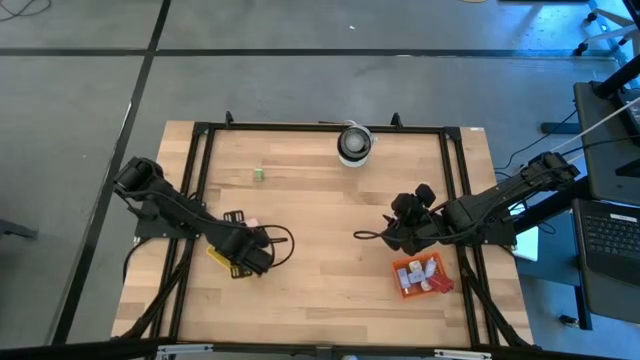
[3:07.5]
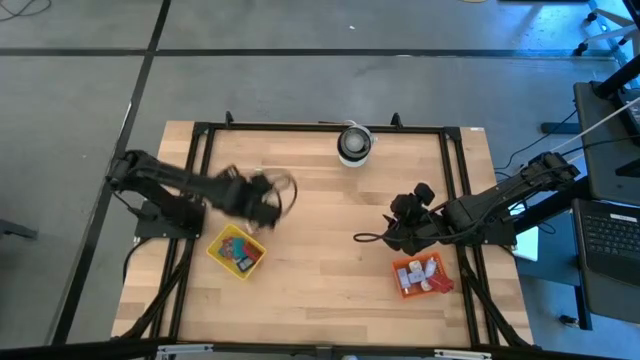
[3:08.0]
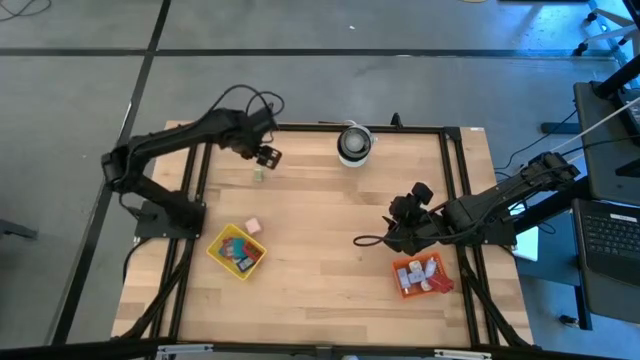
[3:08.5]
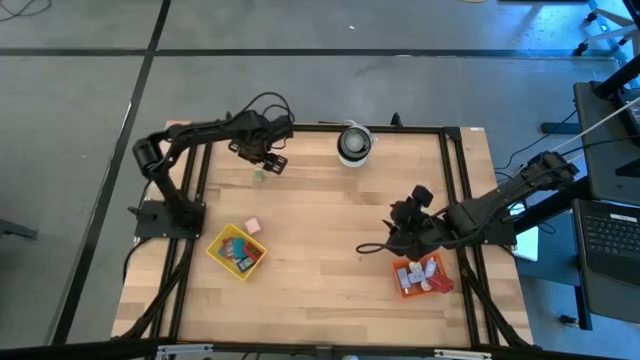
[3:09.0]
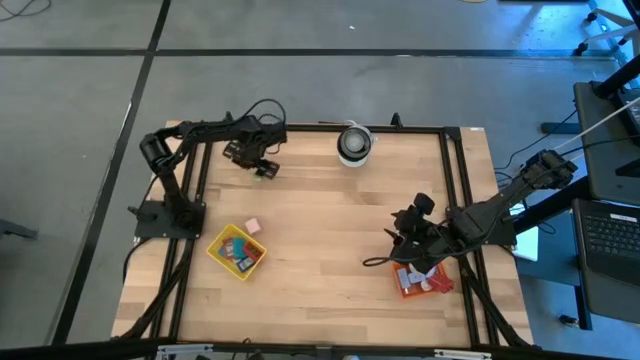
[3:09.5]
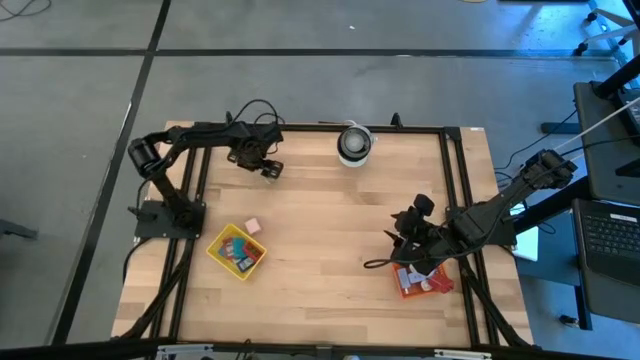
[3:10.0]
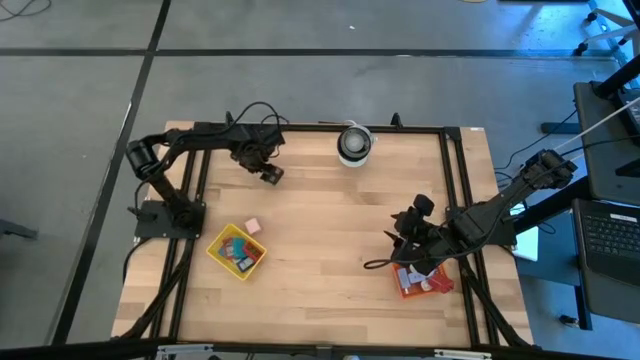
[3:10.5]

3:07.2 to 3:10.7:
Task: Pick & Place Office items
Put the light green charger adapter into the orange bin

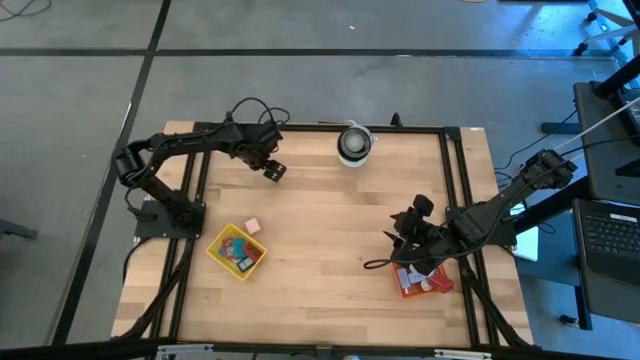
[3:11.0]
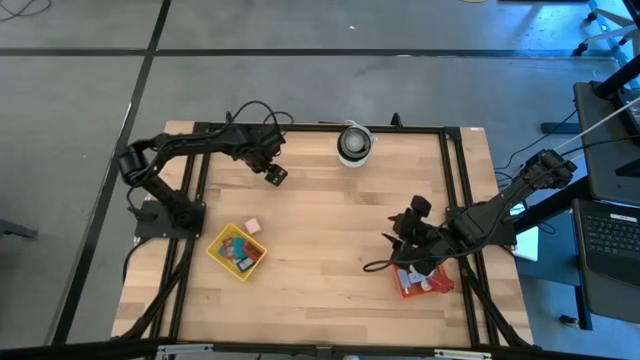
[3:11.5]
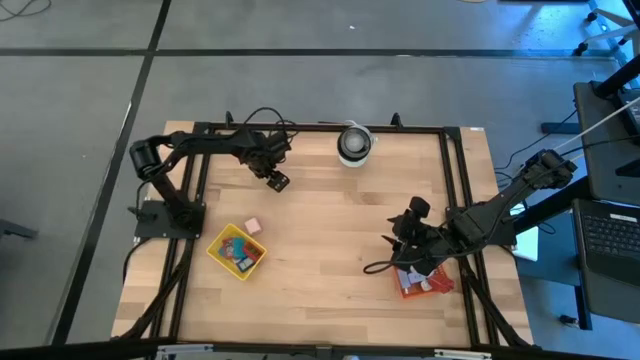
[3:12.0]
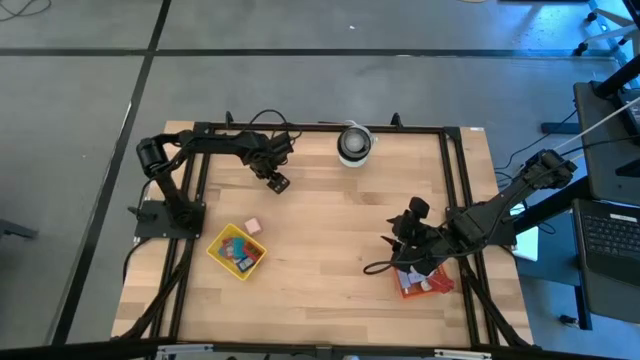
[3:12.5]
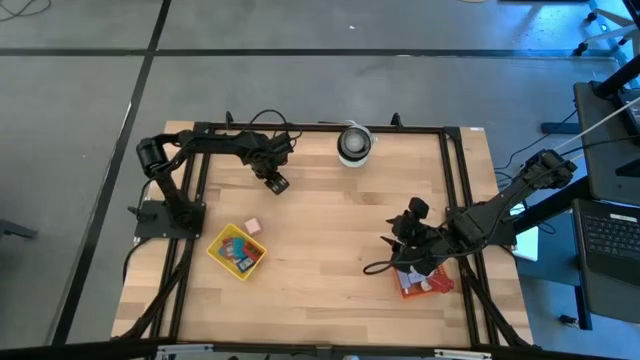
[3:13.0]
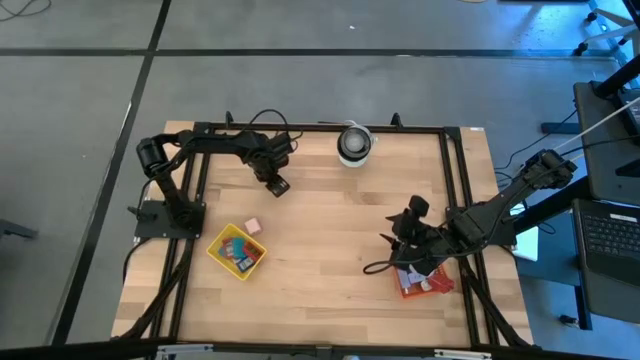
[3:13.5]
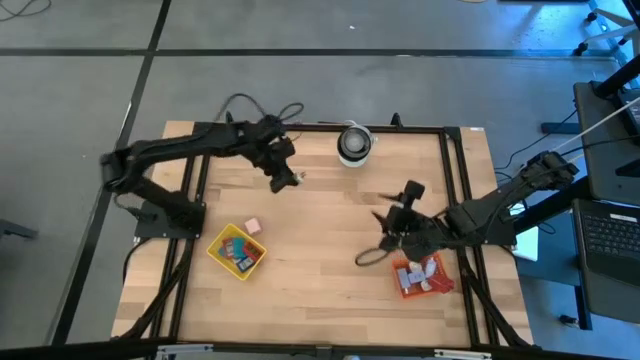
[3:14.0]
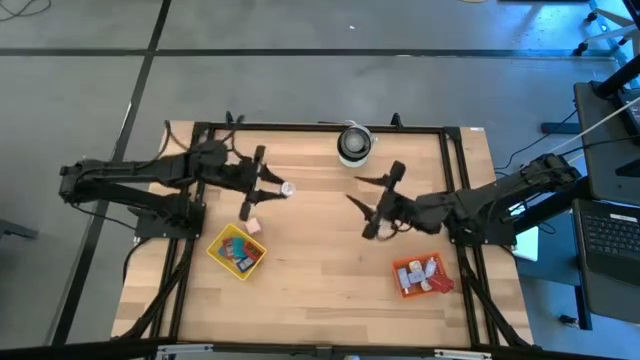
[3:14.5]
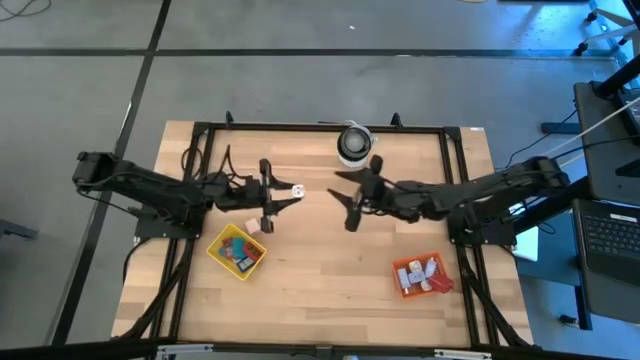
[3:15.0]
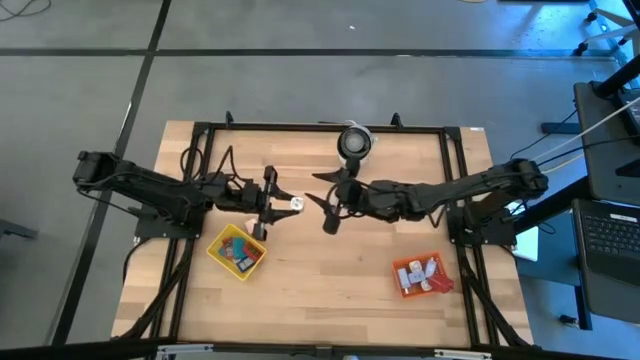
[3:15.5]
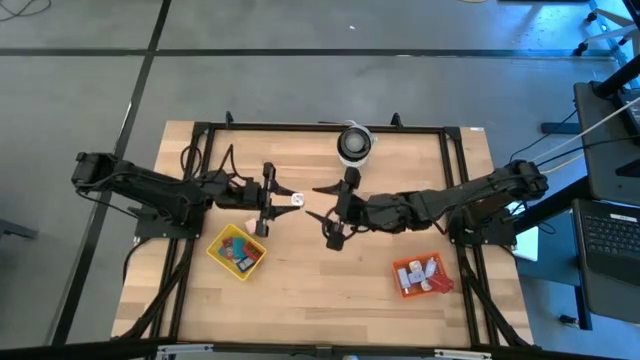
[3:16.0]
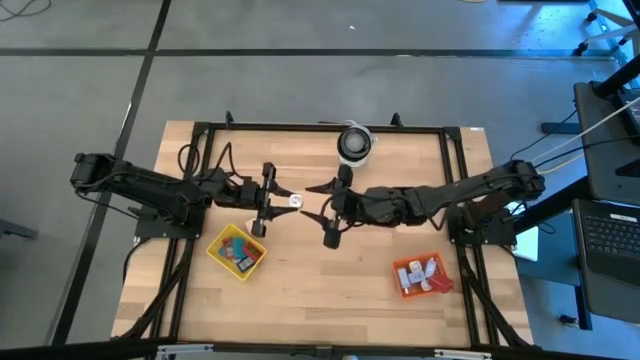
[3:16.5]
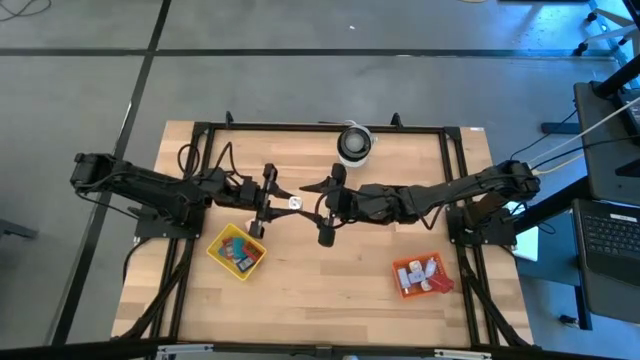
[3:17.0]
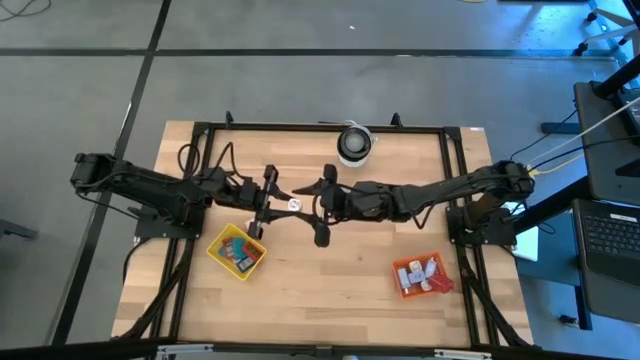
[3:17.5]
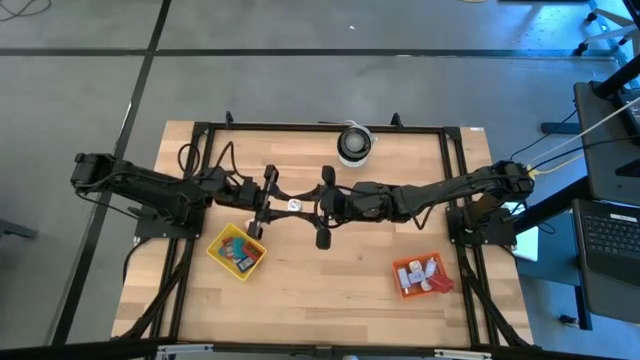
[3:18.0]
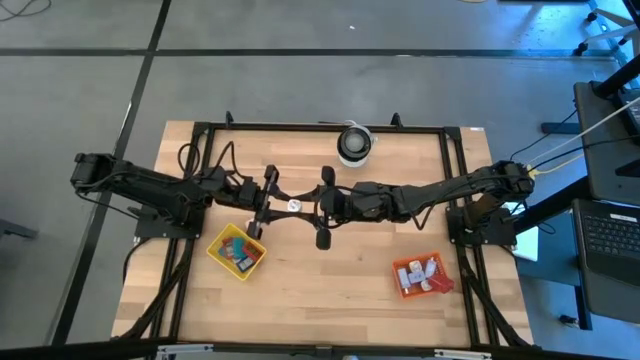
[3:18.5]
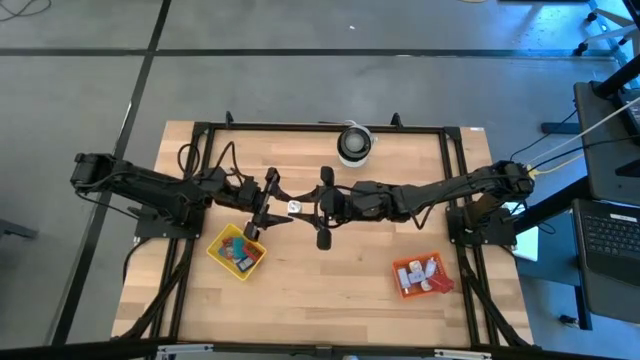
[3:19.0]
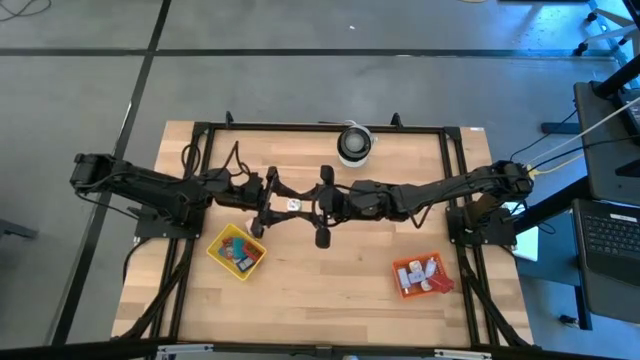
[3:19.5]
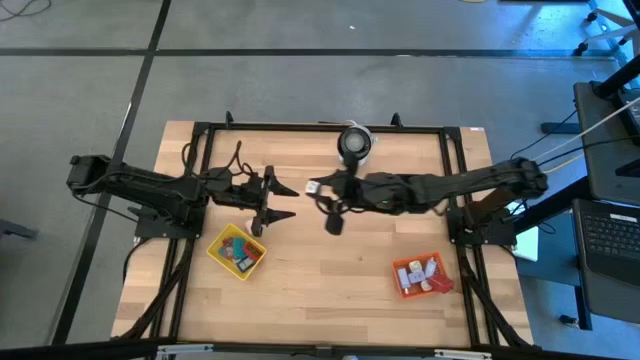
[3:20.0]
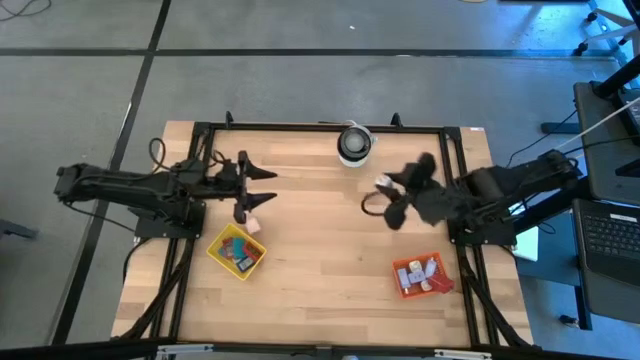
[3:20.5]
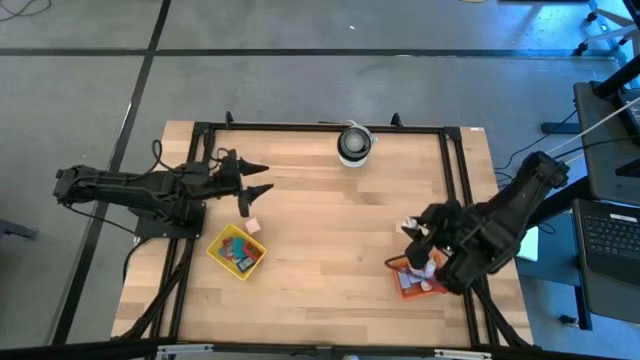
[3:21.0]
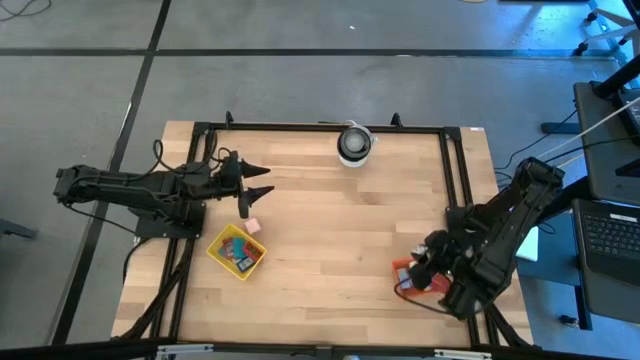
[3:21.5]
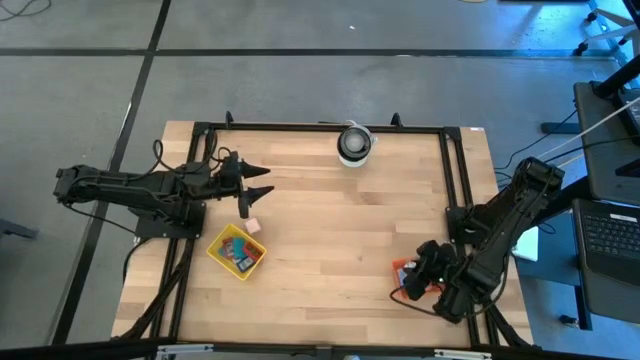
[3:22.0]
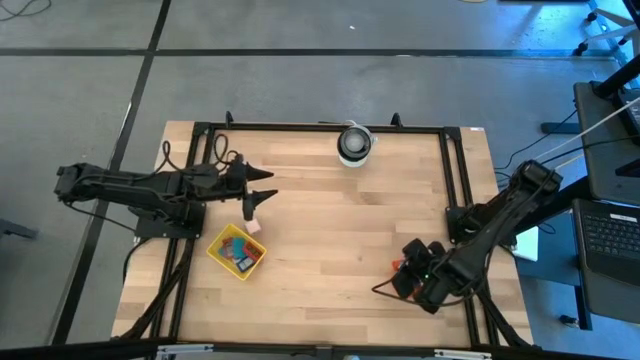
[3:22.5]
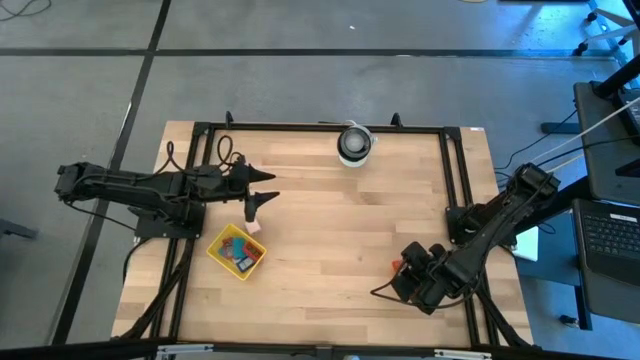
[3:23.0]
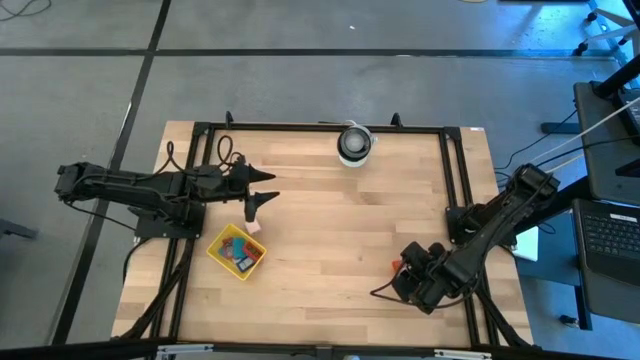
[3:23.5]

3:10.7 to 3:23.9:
Put the light green charger adapter into the orange bin
